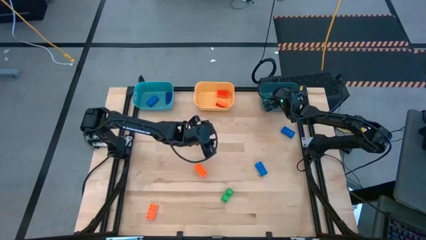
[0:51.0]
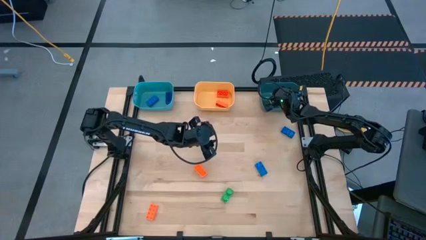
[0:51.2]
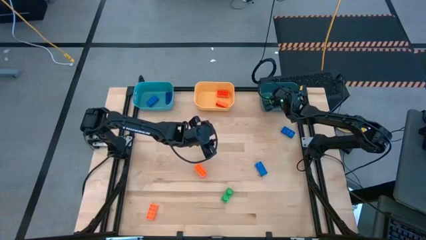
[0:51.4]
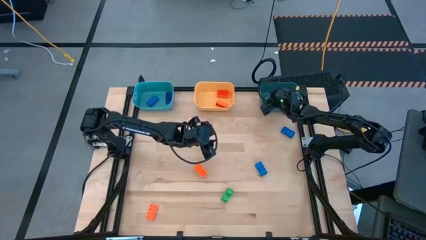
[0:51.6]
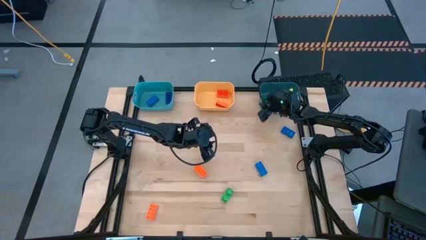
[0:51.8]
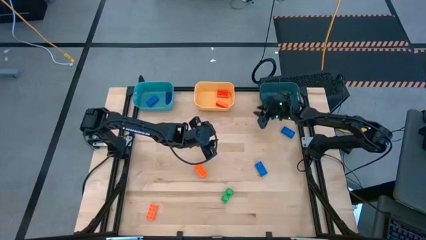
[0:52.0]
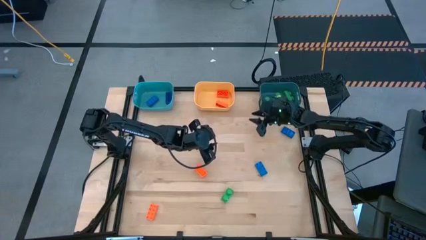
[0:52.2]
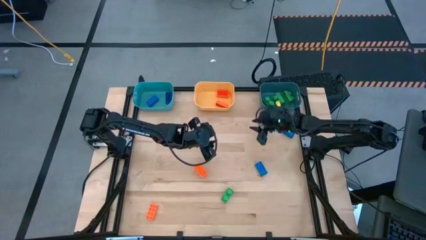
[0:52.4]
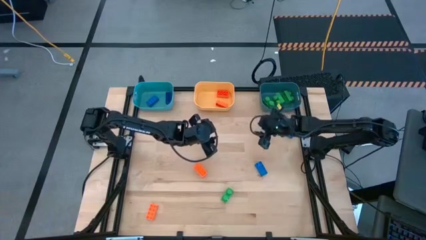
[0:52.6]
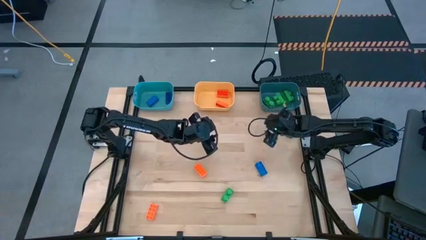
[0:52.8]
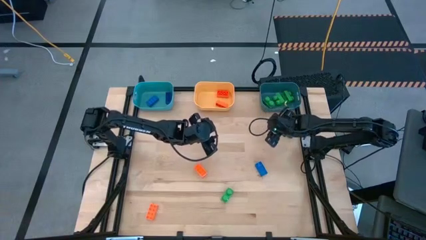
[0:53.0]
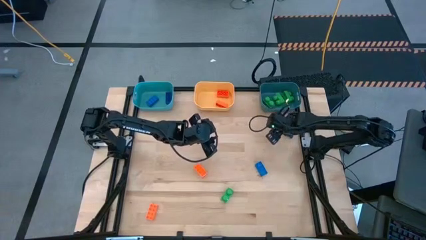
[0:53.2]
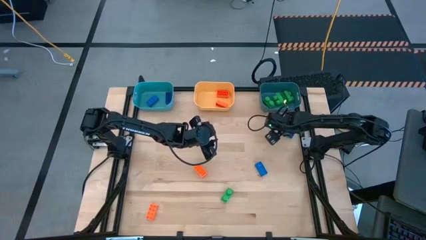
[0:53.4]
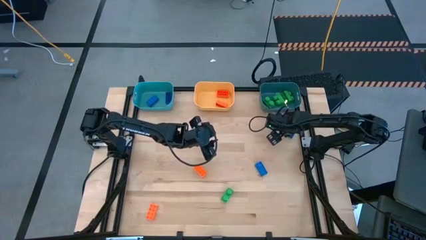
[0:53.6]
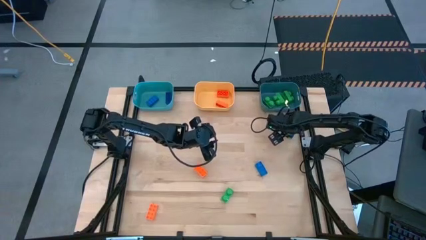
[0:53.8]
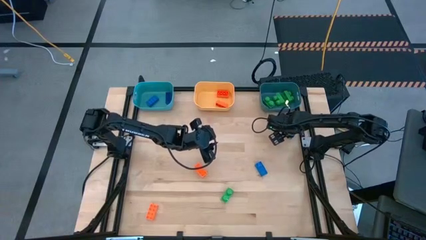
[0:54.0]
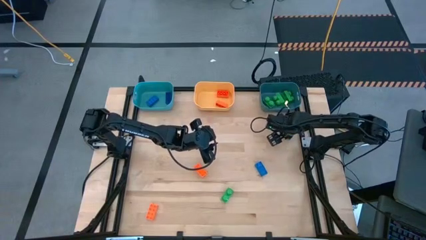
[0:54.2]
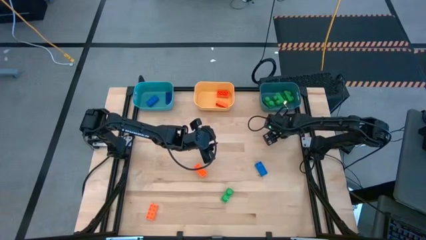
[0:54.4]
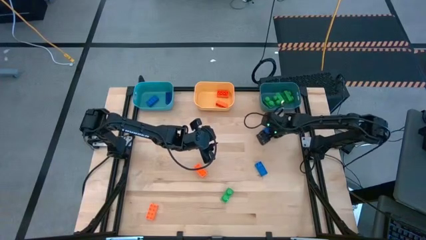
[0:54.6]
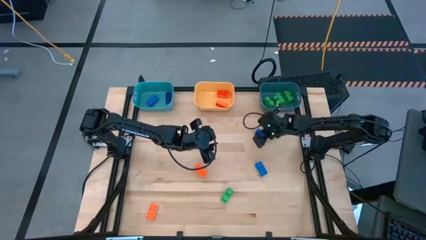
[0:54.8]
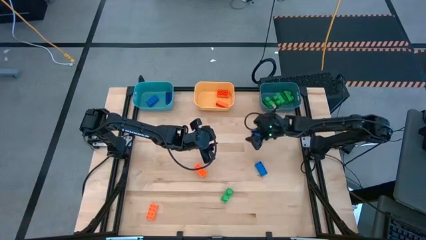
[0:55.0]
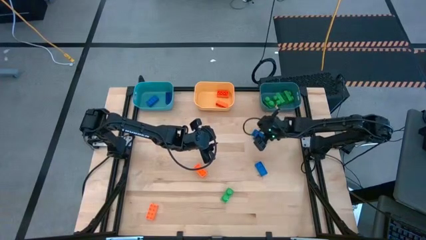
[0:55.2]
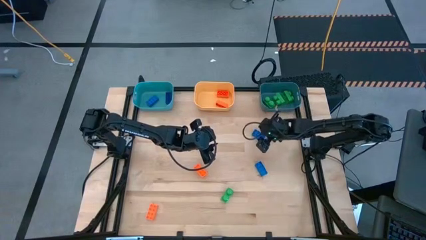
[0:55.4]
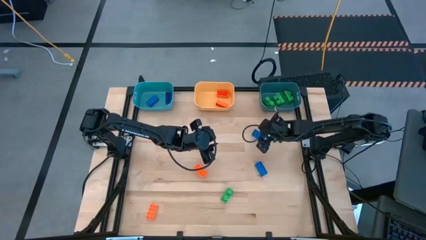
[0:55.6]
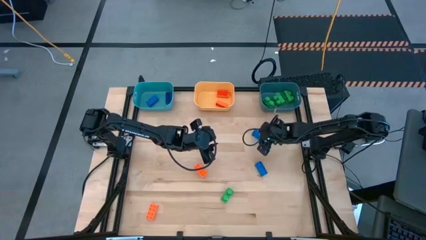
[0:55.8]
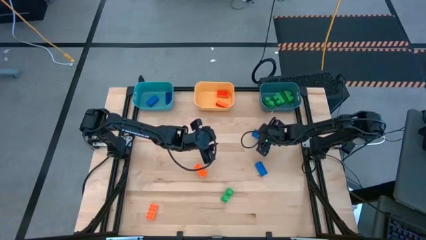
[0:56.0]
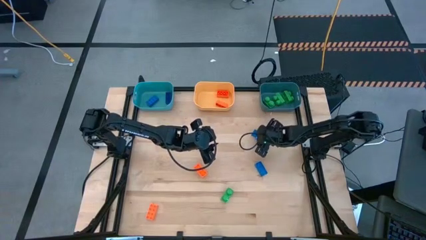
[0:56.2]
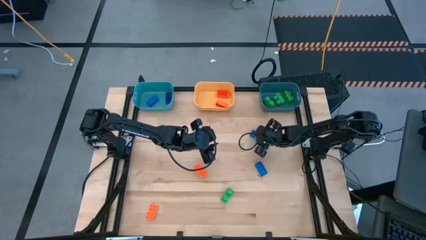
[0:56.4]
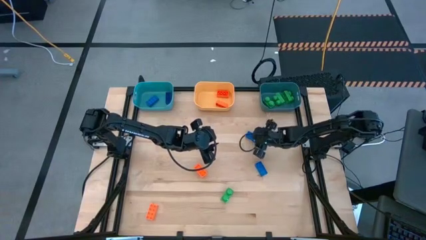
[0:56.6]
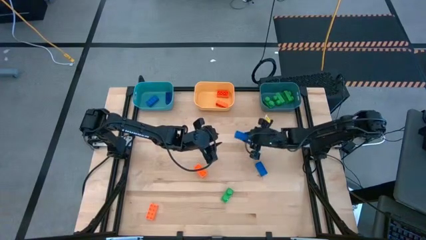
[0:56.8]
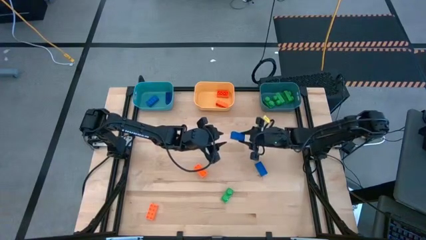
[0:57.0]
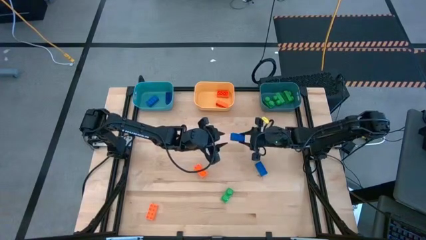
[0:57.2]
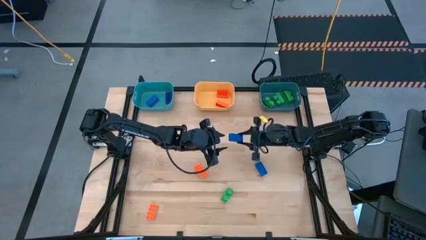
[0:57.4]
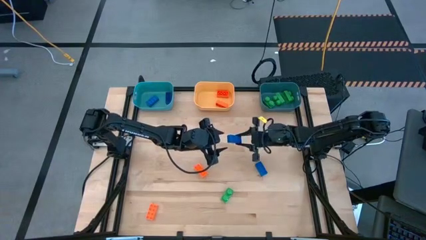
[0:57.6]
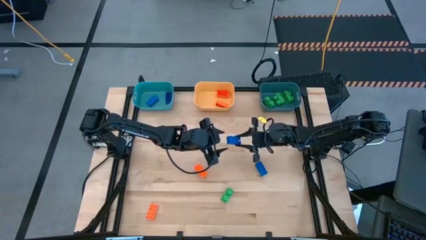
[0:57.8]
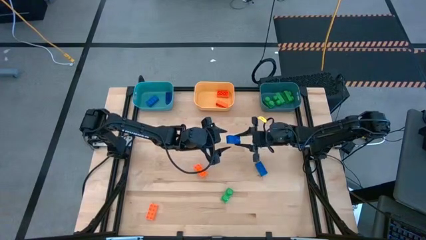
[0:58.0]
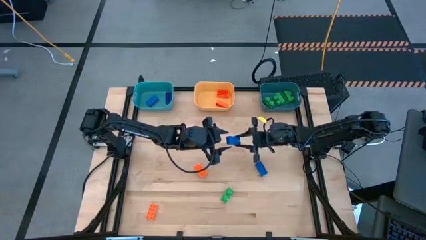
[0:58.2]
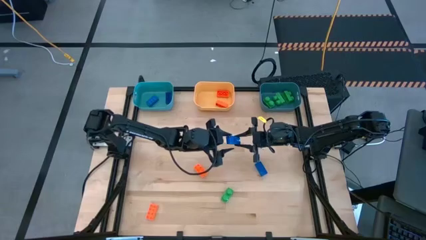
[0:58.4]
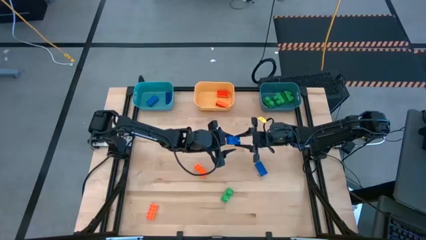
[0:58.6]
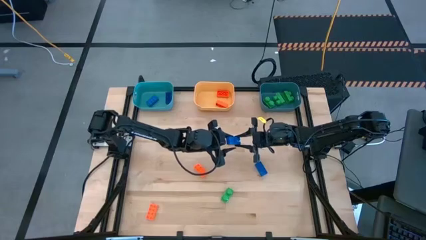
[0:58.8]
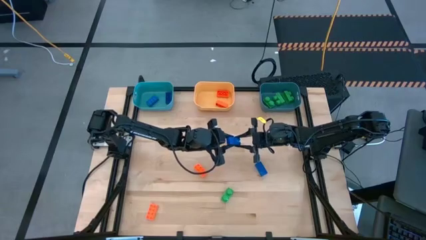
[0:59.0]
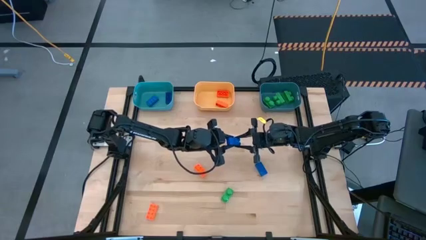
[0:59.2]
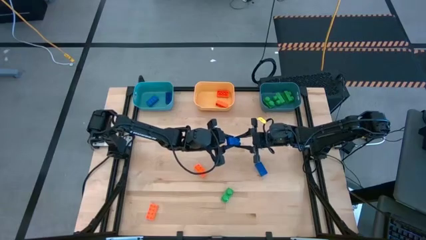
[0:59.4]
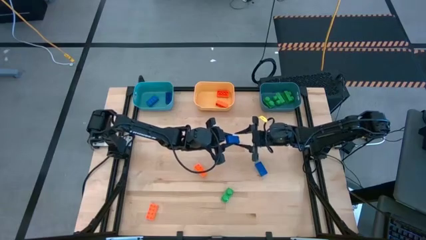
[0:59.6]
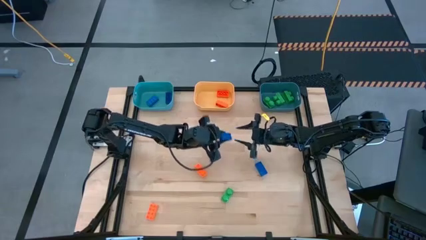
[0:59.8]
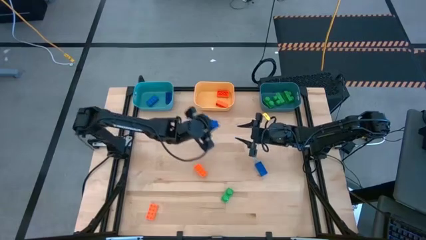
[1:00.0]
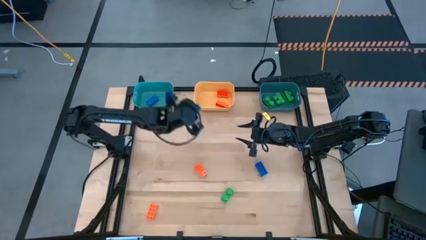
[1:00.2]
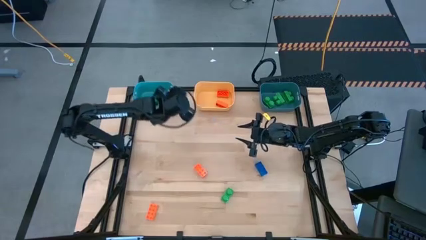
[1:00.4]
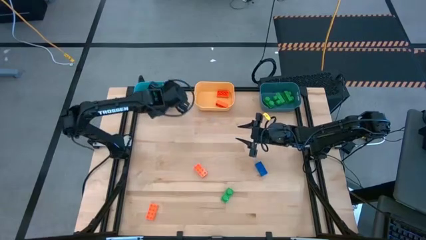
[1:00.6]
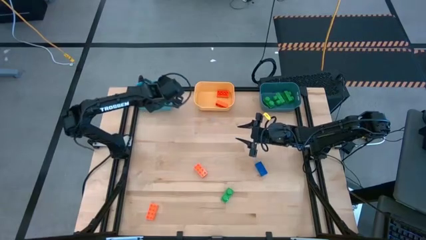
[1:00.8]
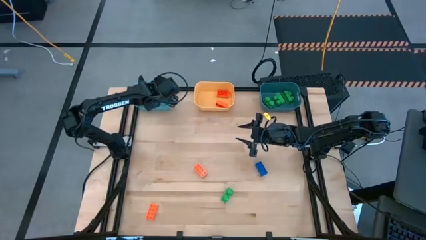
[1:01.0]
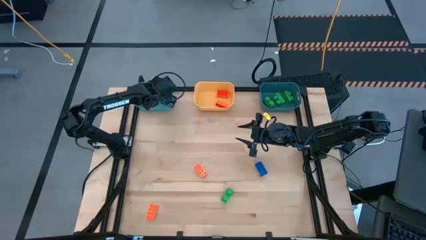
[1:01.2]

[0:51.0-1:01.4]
Task: Sort & place blocks by color
Put the blue game piece into the blue bin

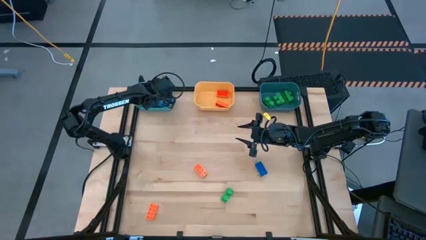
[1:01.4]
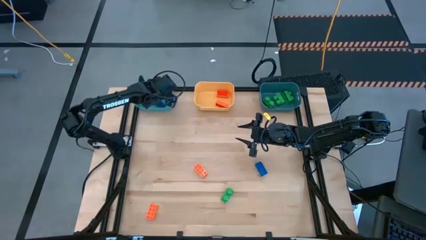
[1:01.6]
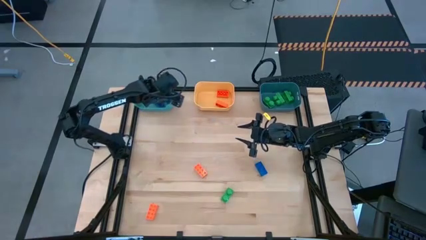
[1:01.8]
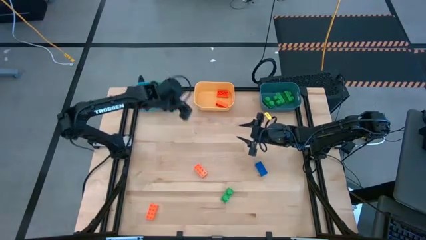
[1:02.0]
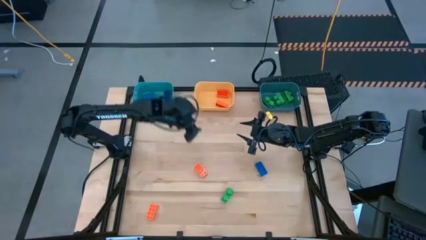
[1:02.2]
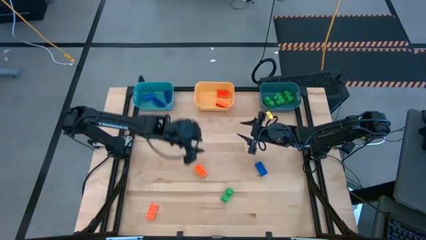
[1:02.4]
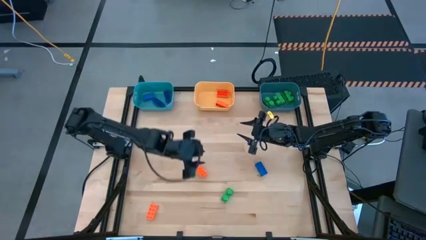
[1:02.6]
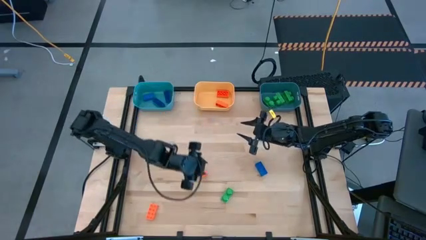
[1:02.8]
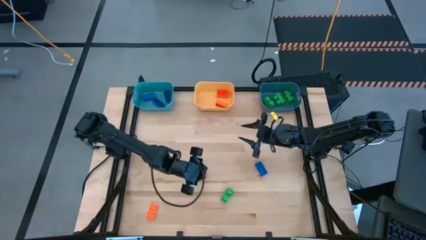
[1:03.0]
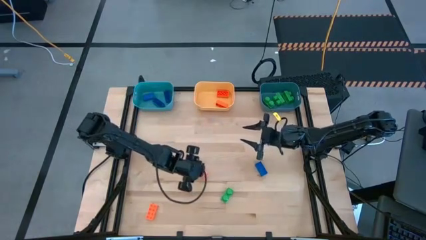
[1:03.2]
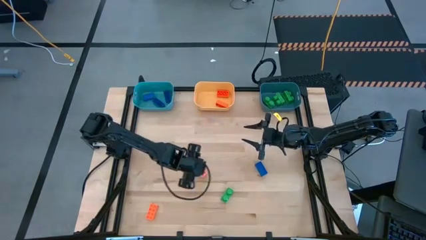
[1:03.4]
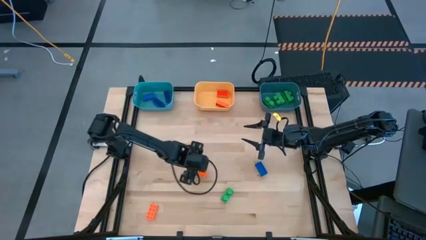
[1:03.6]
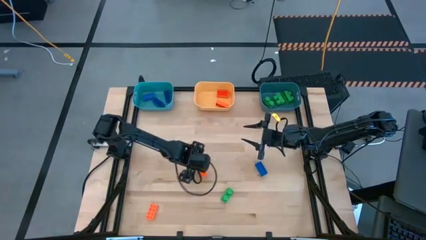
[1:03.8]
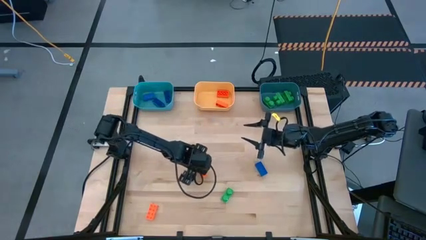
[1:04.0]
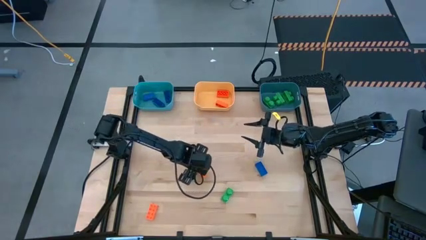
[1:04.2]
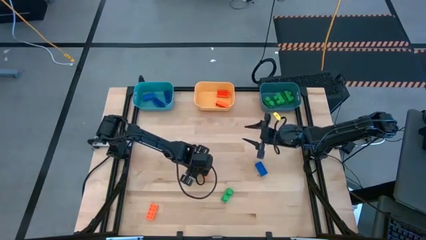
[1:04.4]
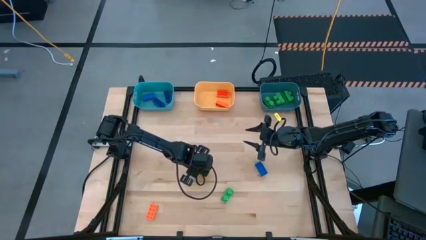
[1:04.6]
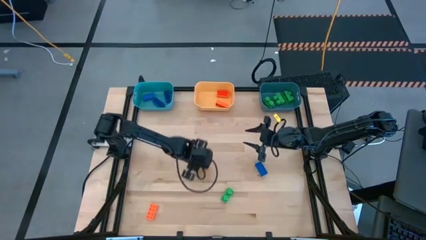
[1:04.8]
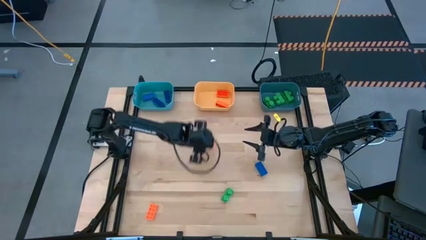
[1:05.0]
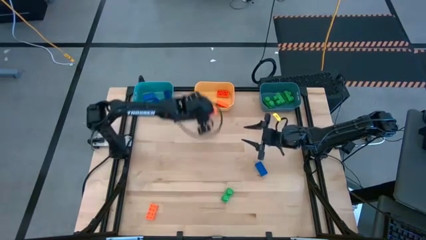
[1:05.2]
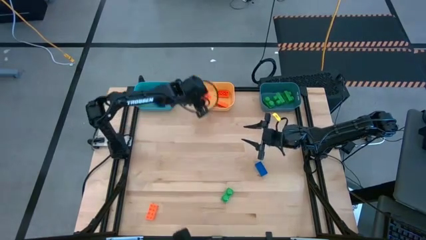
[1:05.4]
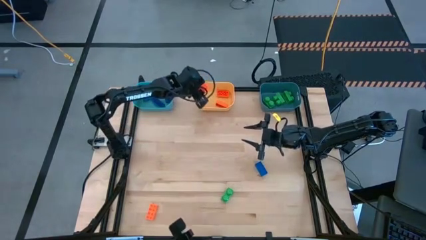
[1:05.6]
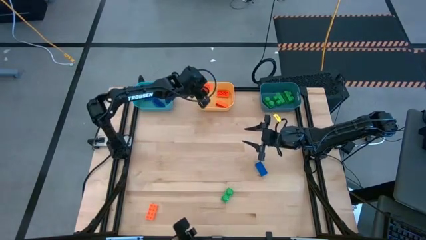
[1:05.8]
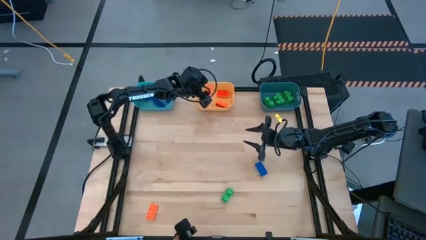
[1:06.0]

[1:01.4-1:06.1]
Put the orange game piece into the yellow bin
